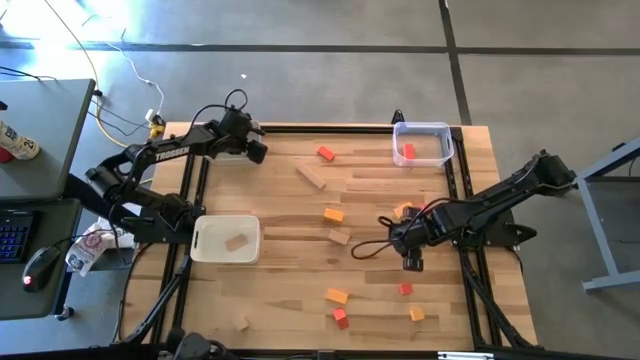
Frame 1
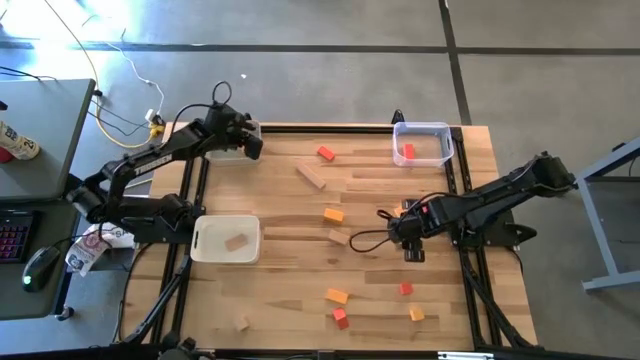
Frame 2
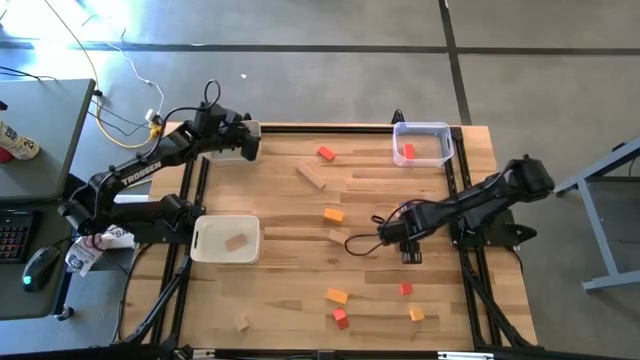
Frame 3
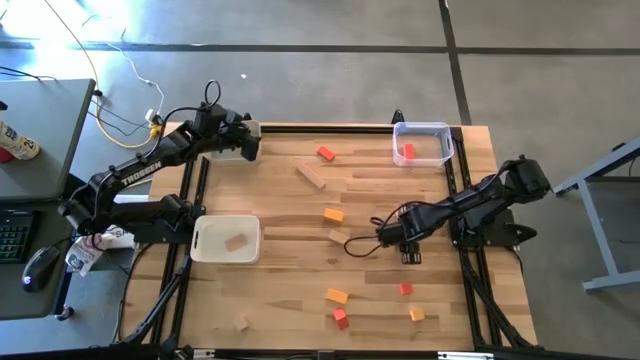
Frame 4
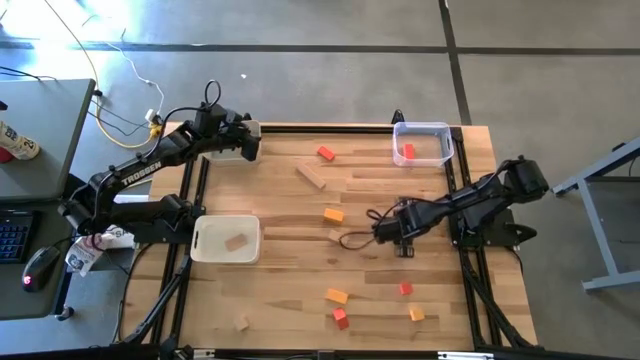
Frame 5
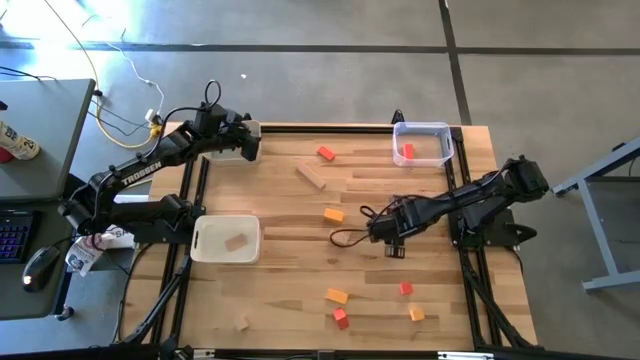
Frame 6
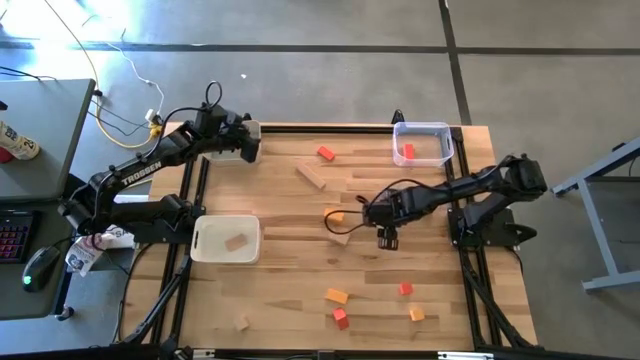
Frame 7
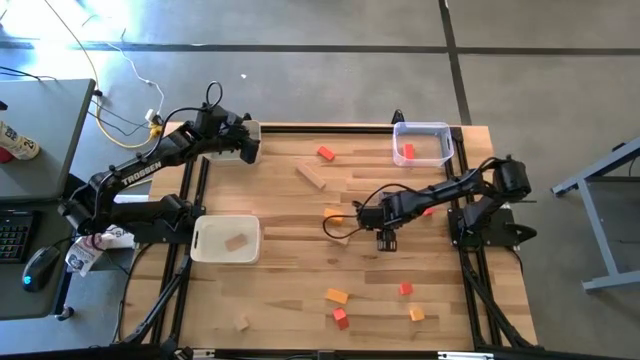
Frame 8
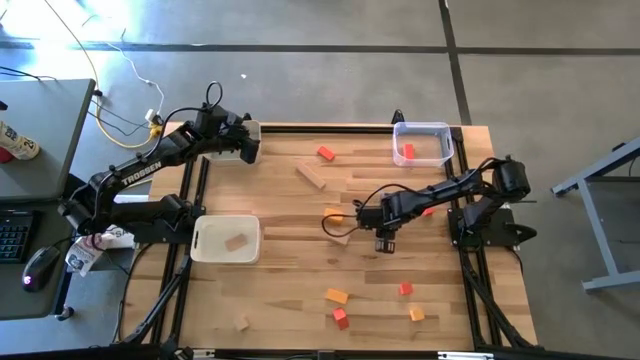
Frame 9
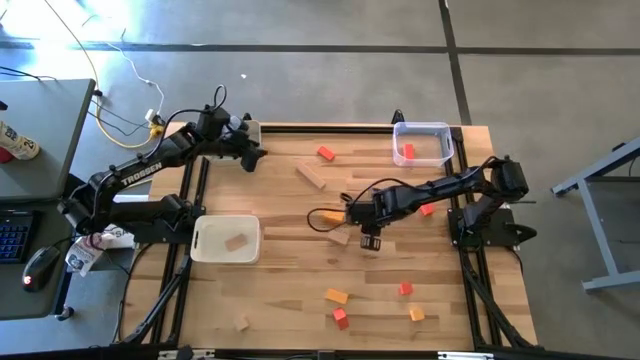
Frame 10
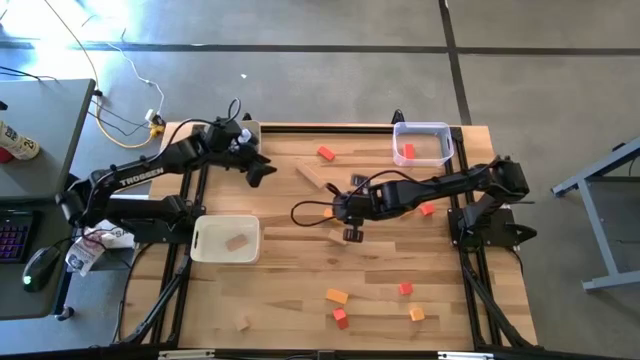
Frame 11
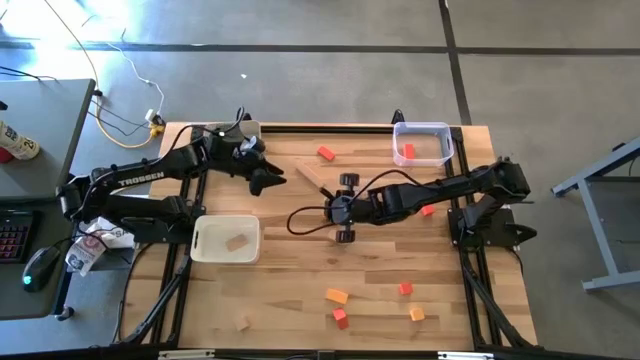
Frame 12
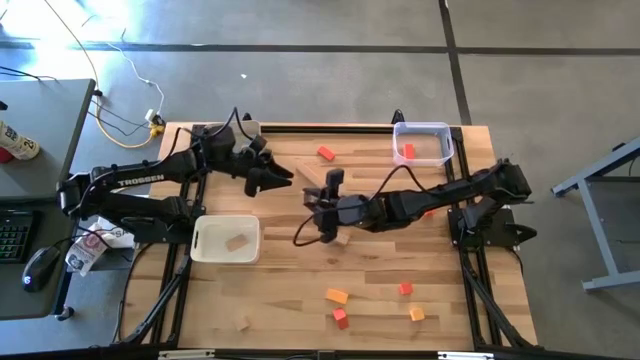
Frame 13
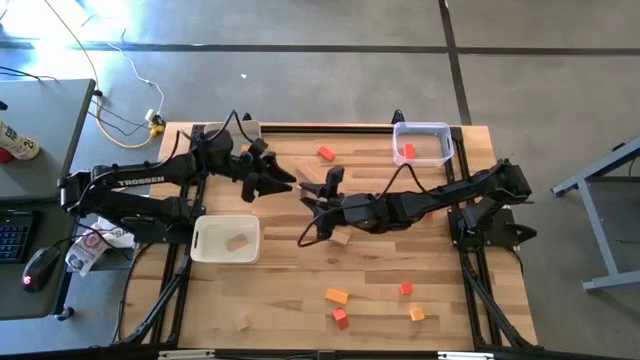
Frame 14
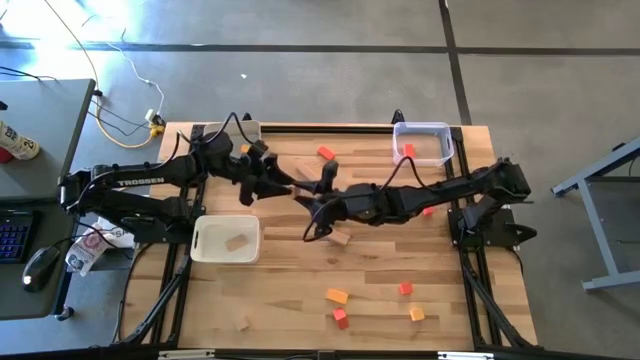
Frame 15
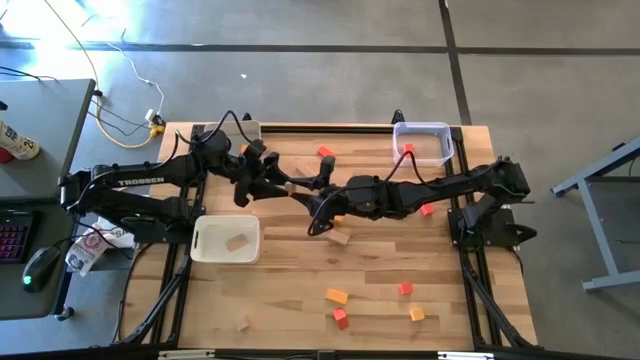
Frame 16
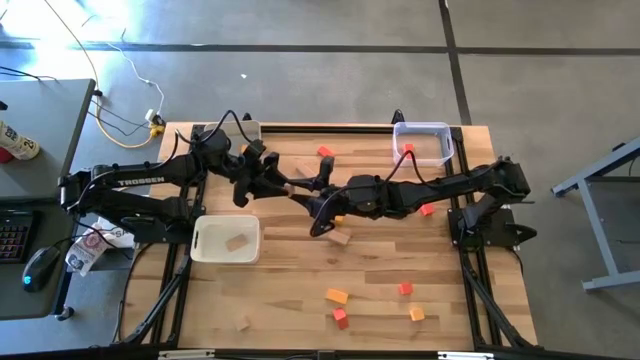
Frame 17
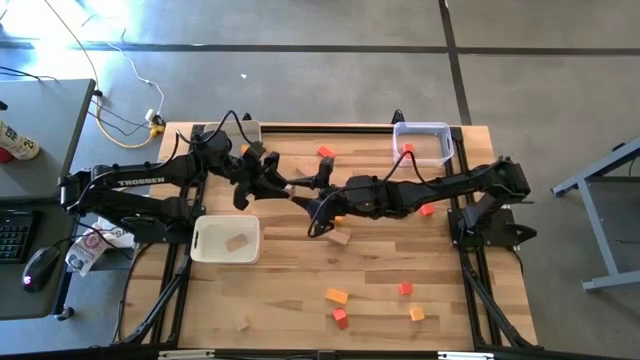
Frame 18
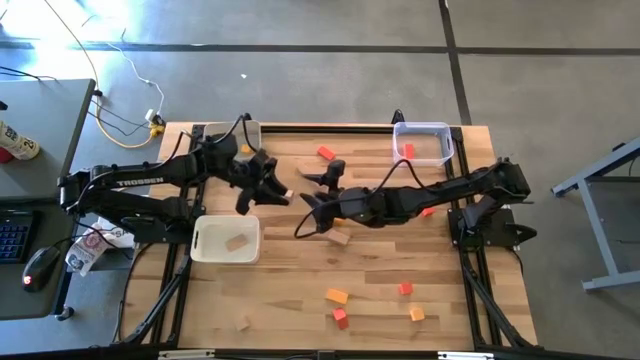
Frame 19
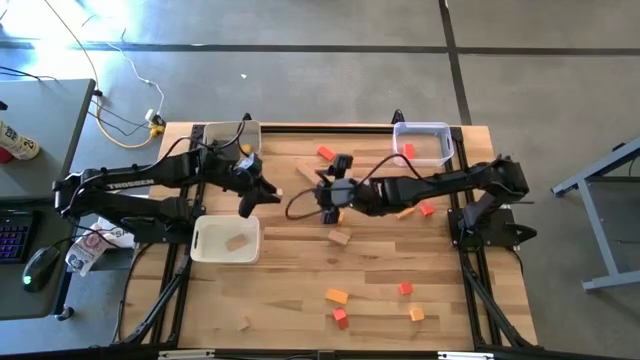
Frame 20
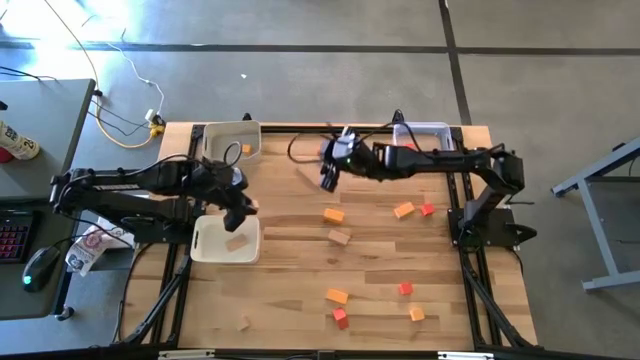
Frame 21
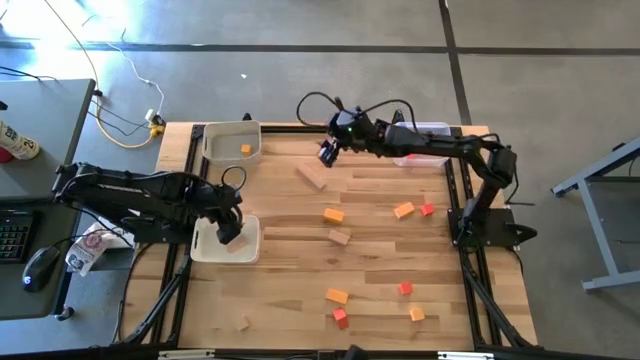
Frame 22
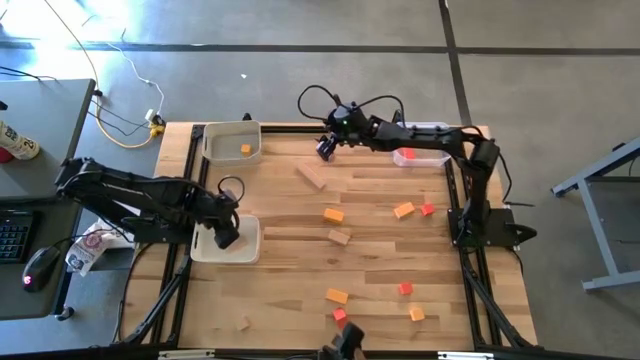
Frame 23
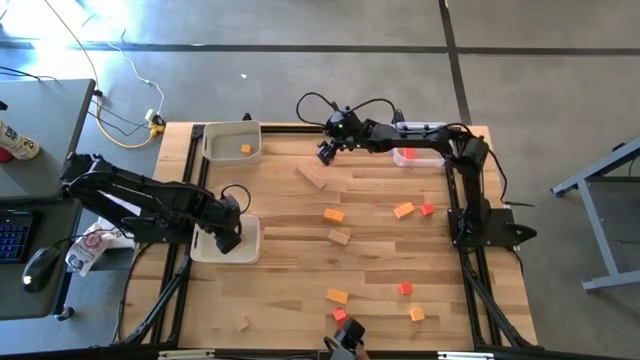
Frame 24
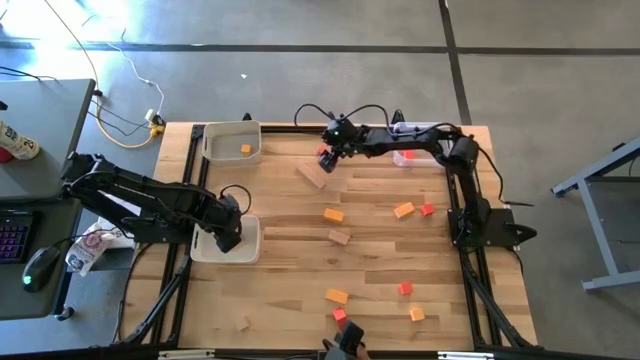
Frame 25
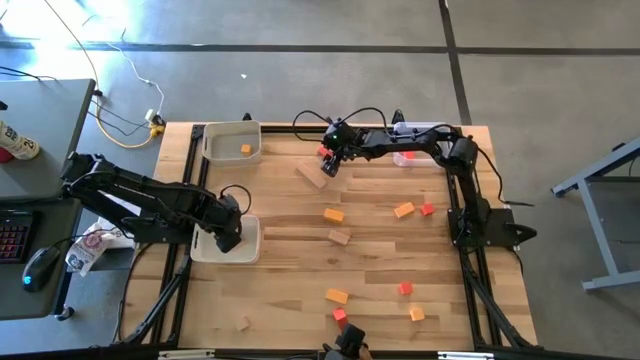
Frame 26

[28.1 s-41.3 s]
Task: Sort & place blocks by color
Put the brown block into the white bin

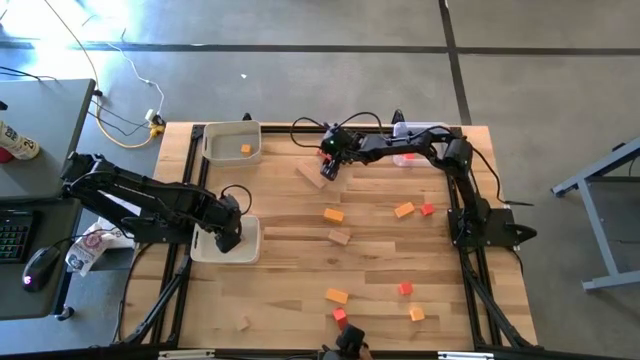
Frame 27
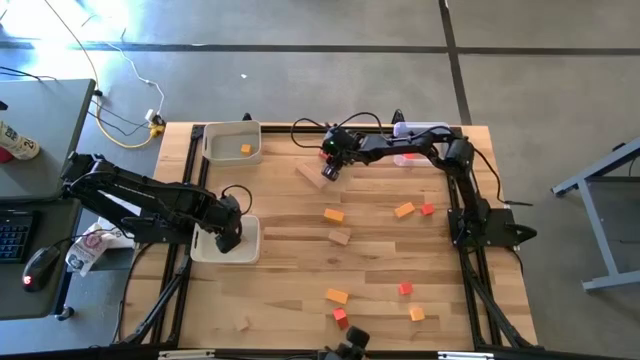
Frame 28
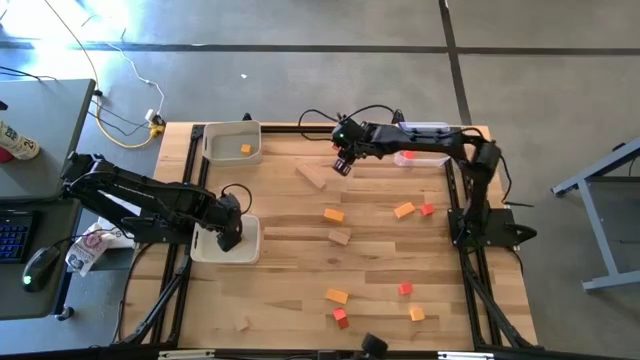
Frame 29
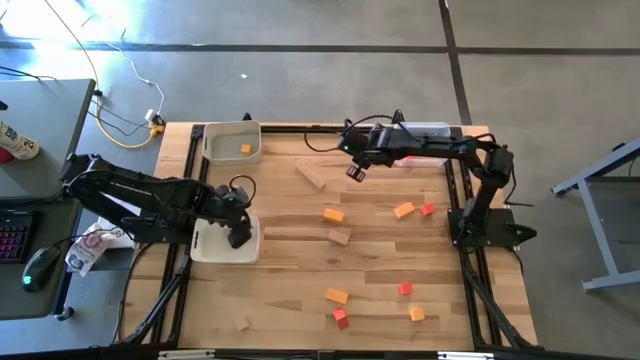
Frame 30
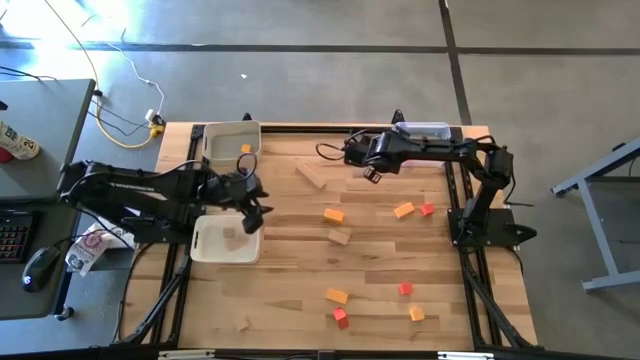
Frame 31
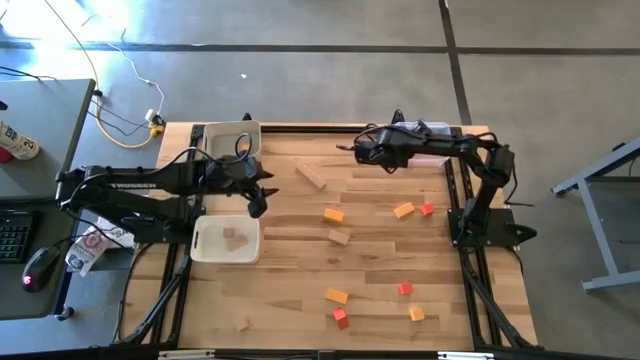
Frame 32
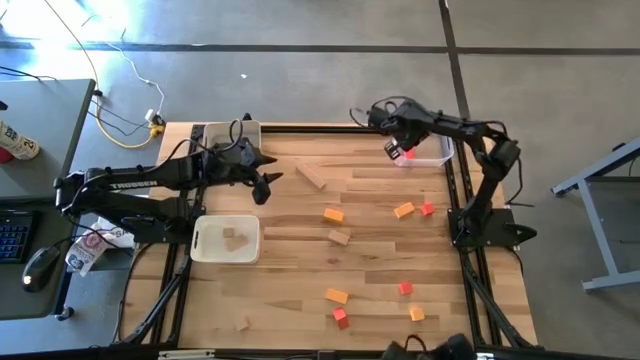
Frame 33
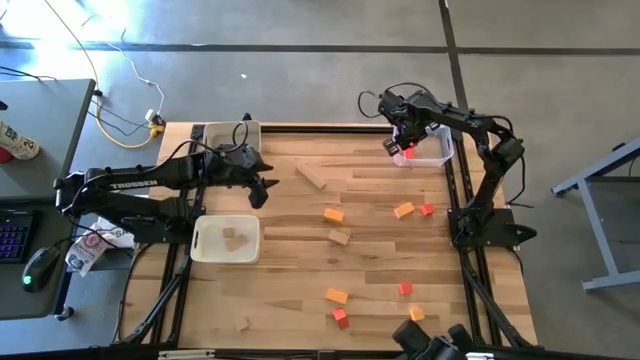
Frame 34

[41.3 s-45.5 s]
Put the orange block into the transparent bin

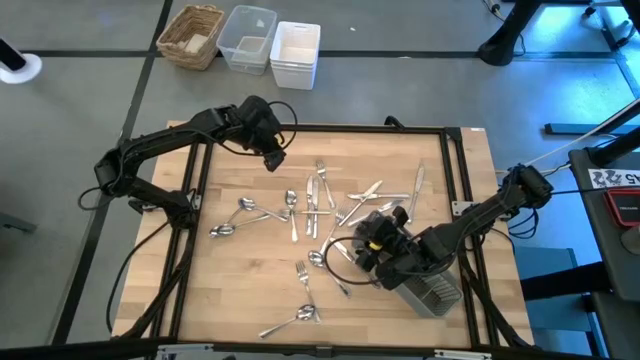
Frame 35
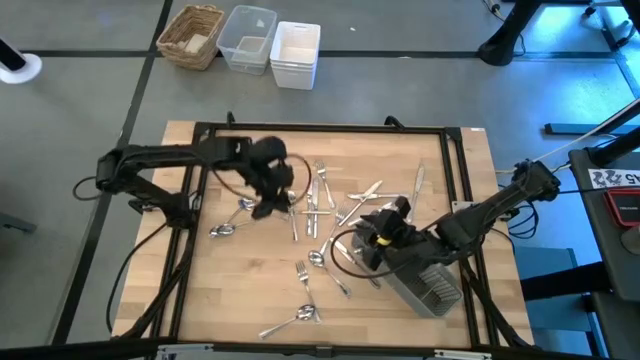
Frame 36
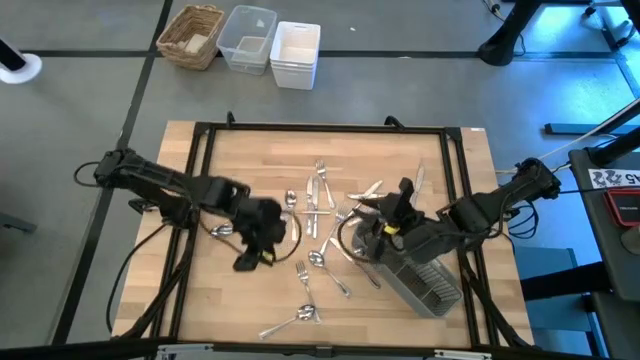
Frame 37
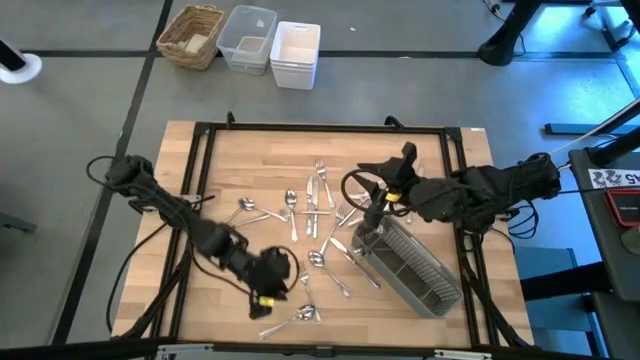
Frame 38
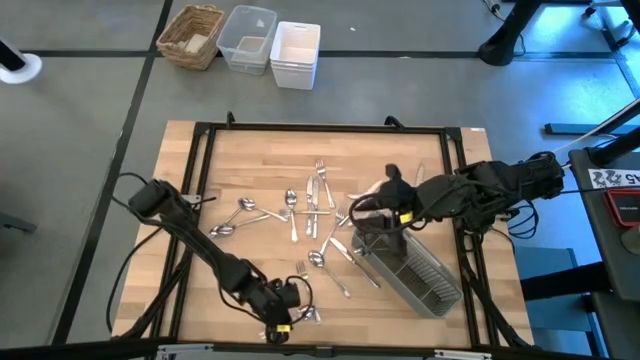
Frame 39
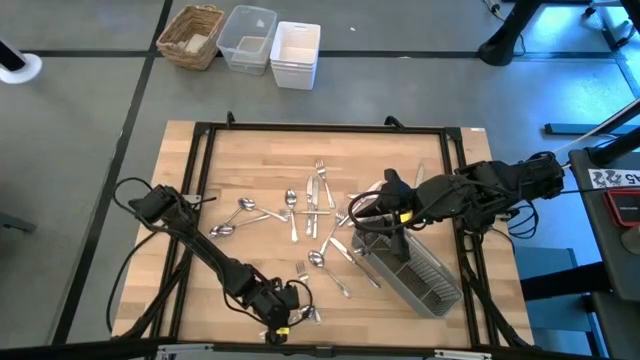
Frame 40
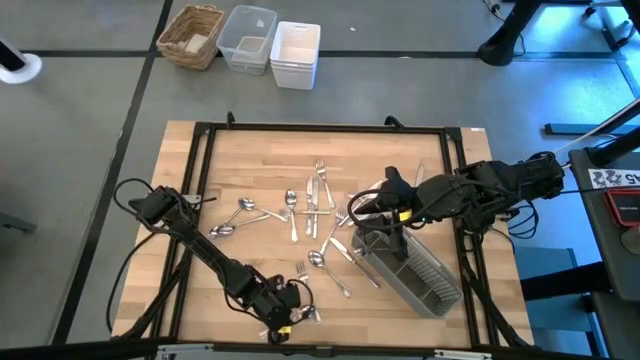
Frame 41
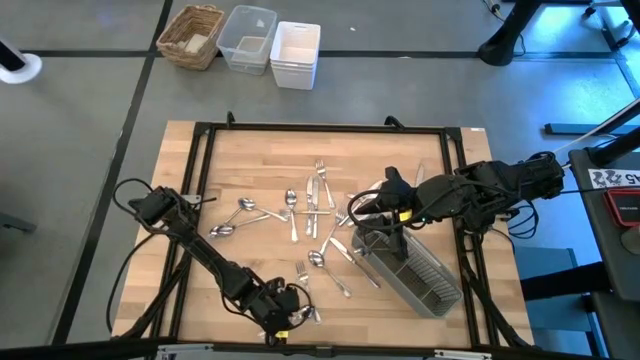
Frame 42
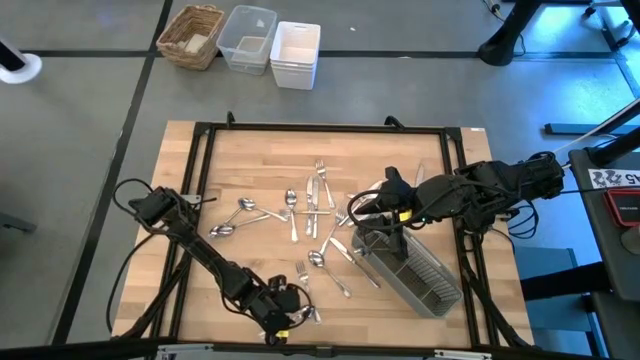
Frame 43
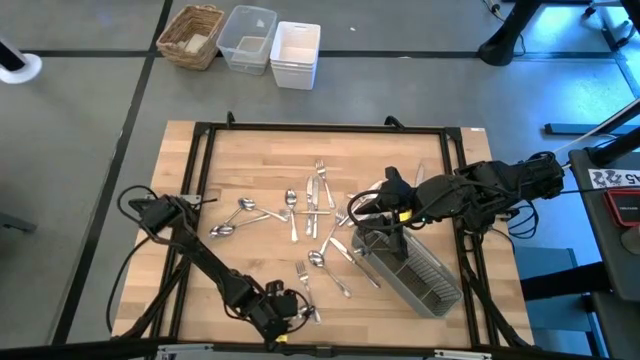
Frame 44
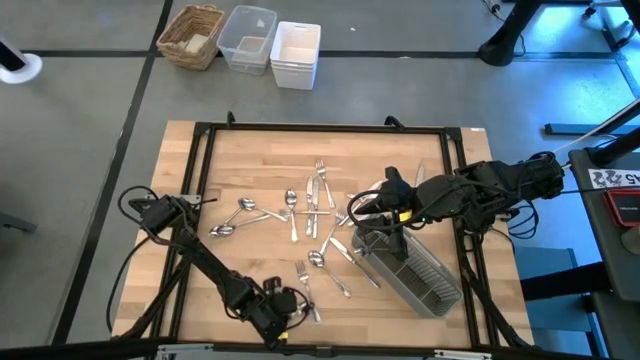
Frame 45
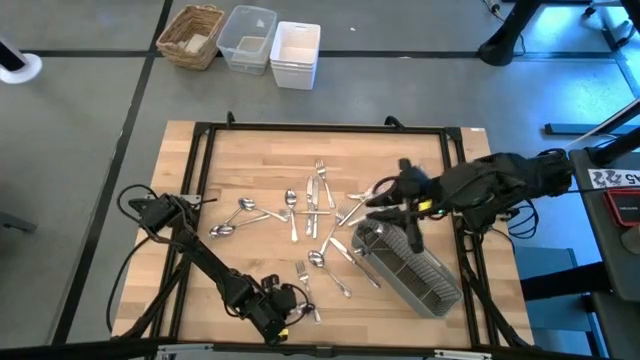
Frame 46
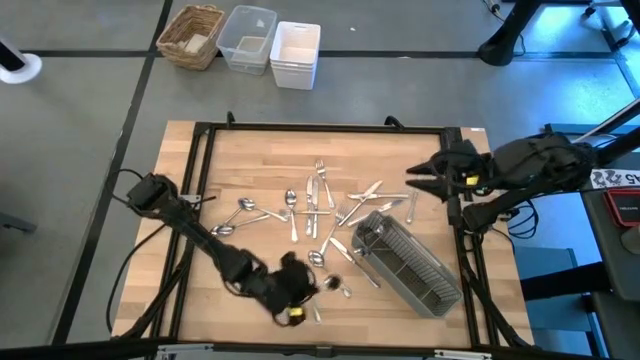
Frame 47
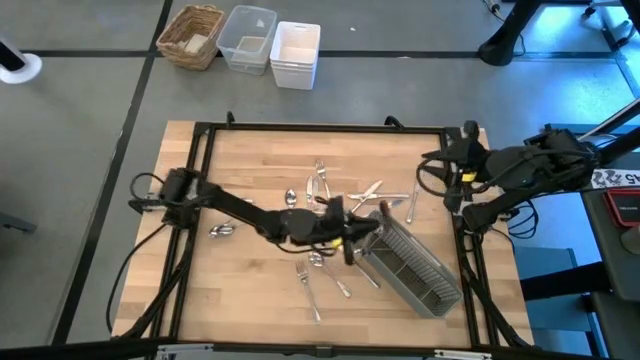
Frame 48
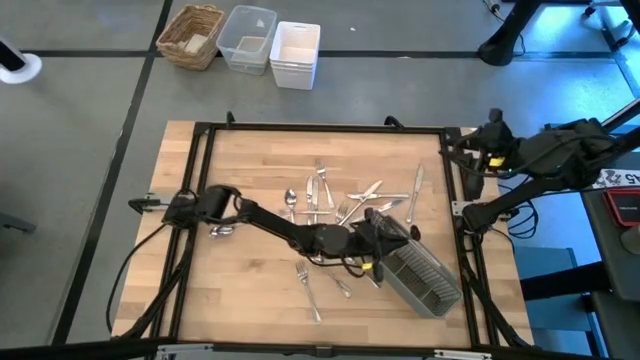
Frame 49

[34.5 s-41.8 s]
Task: Sort silverware
Put the silver spoon into the gray silverware basket
